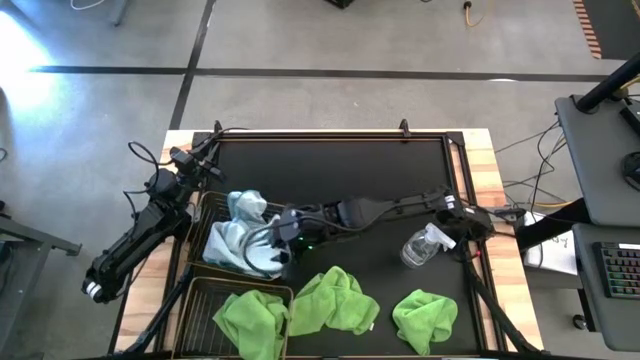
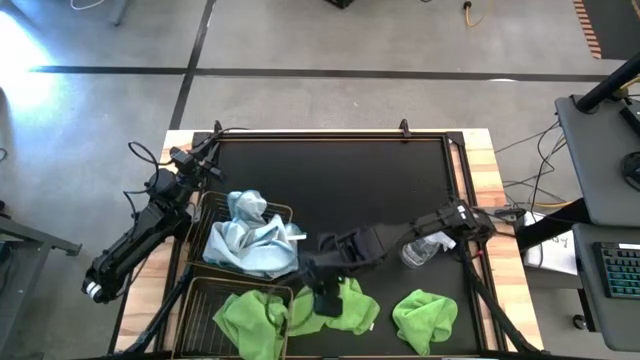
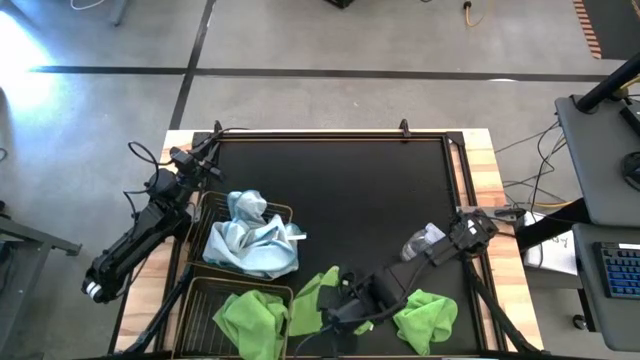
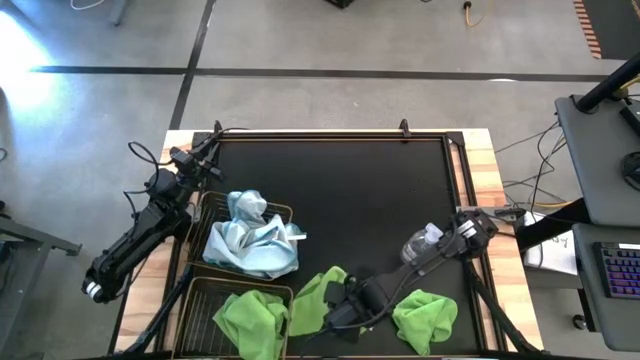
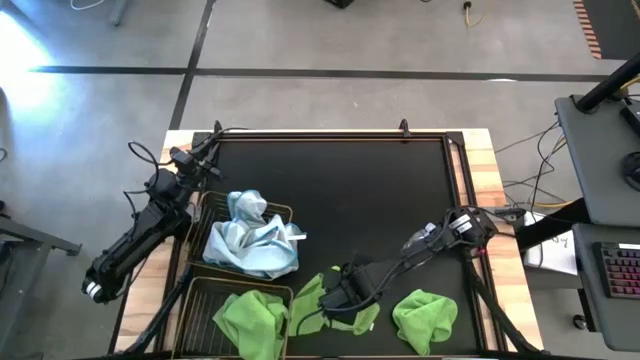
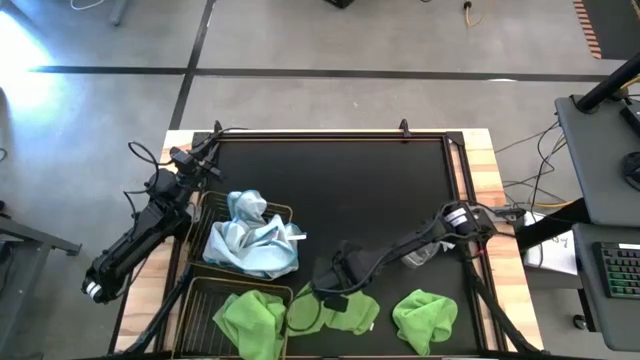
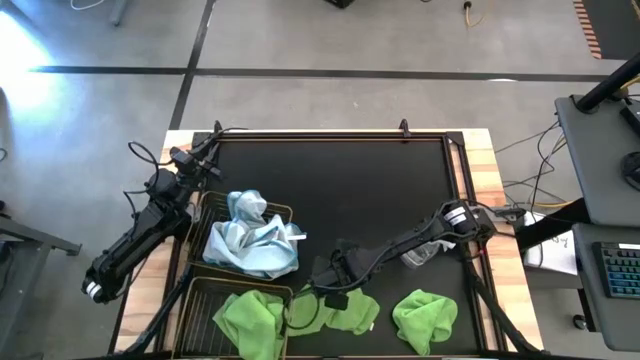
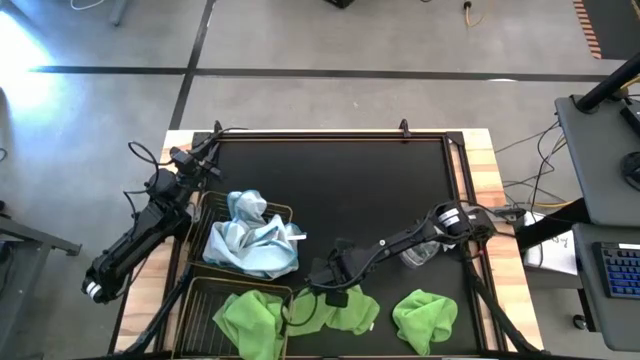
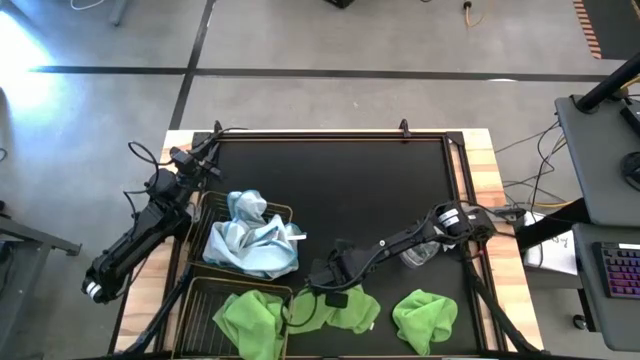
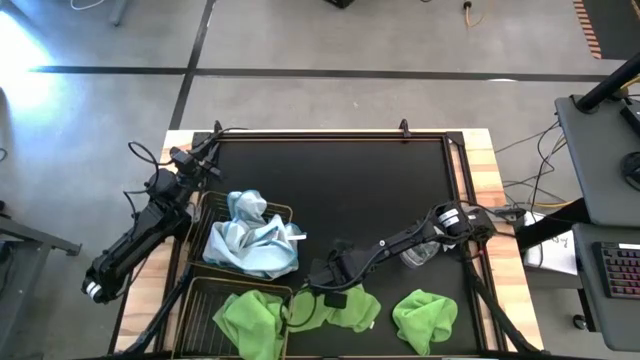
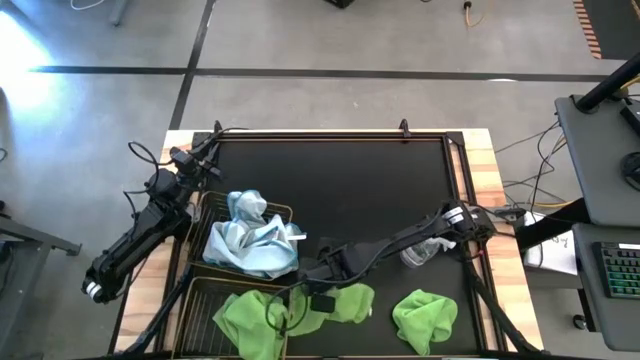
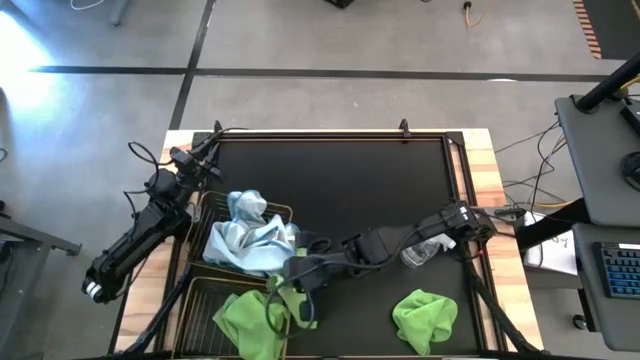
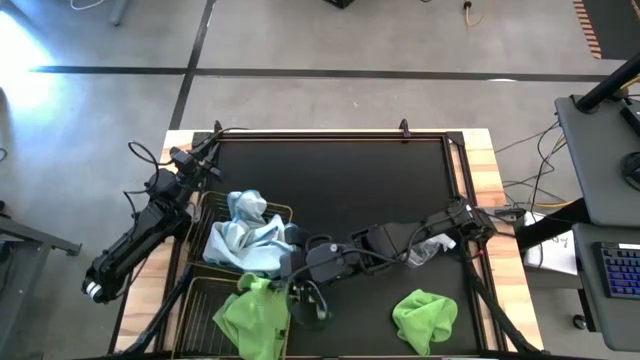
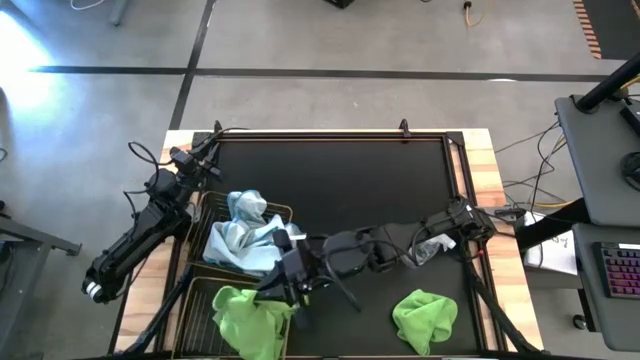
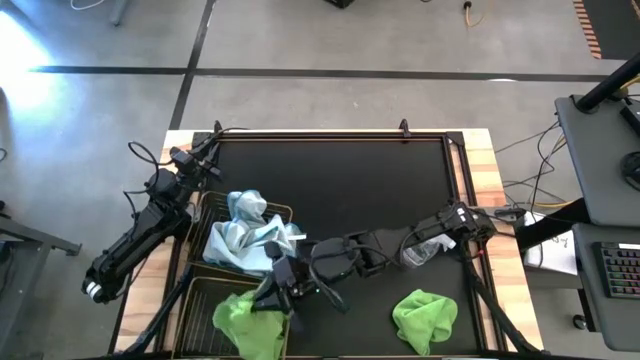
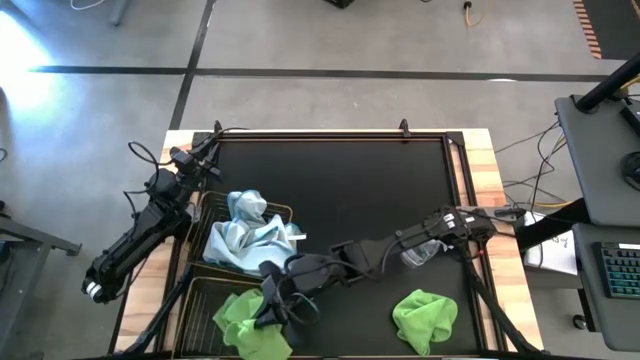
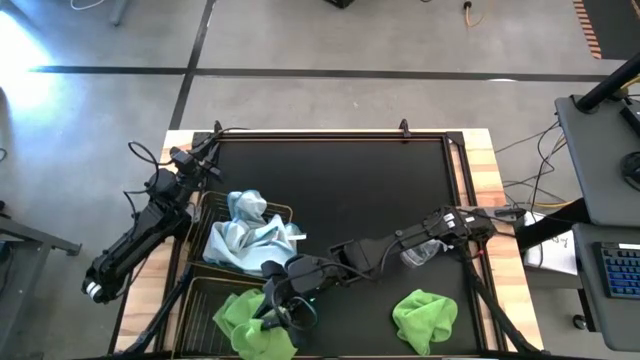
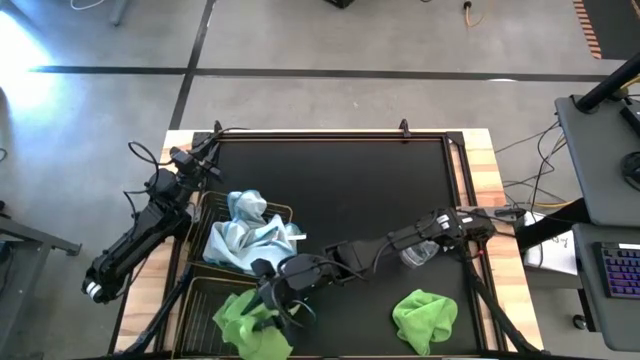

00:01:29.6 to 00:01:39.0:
Task: Sort microfiber towel by color & place in baskets
Put the left green towel into the bottom wire basket

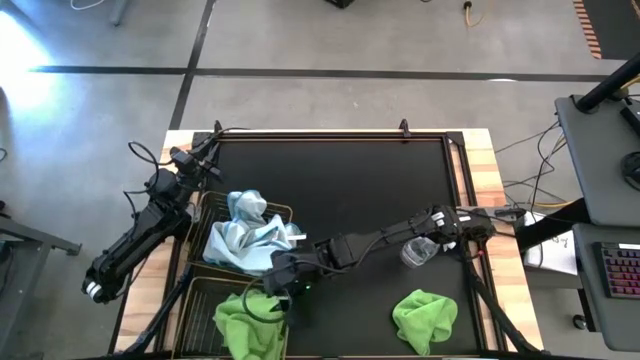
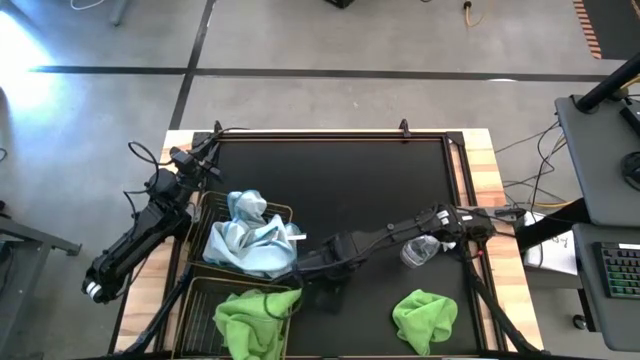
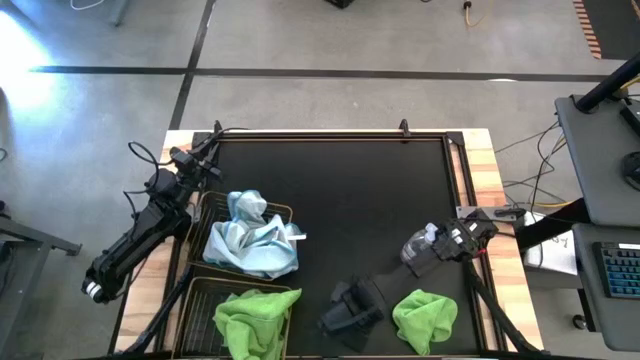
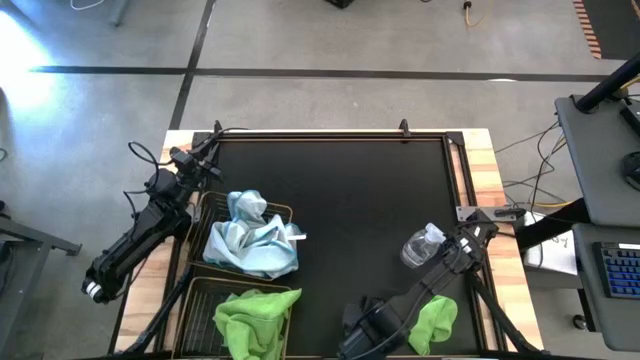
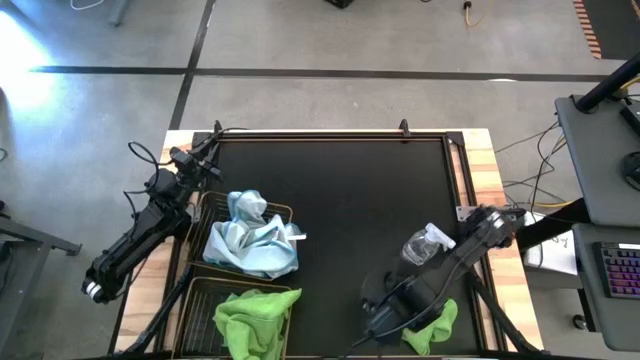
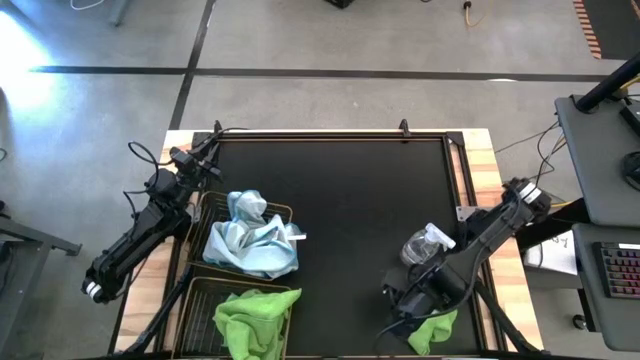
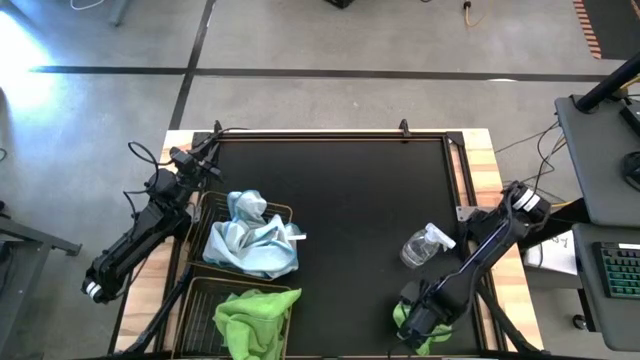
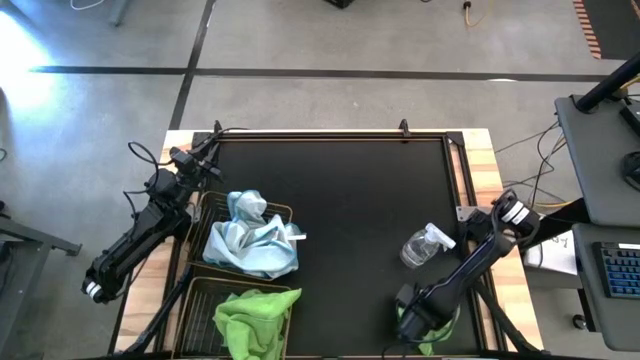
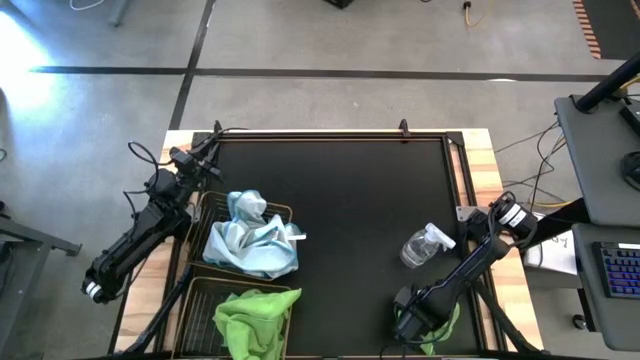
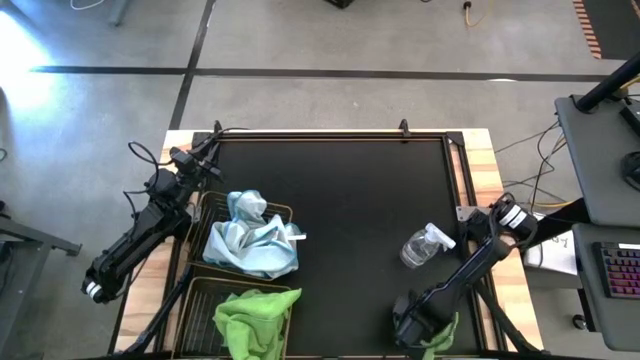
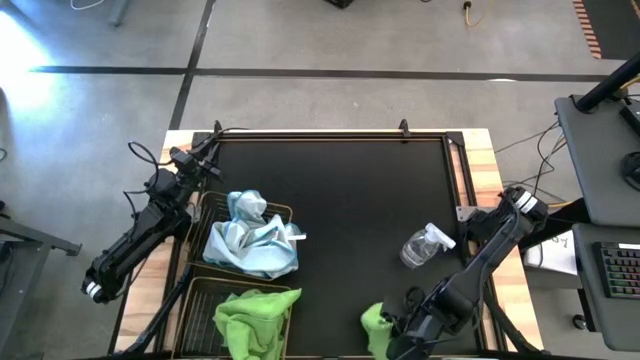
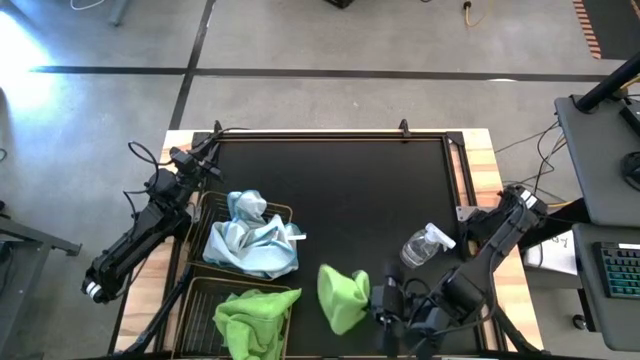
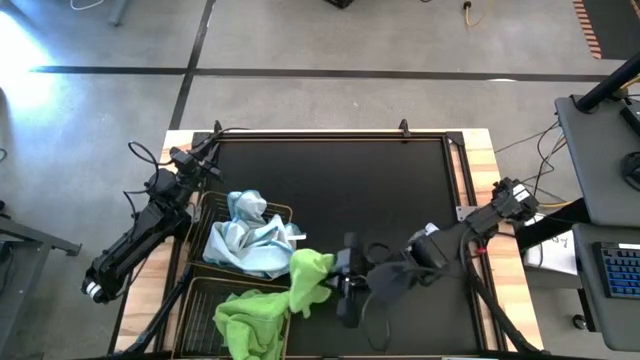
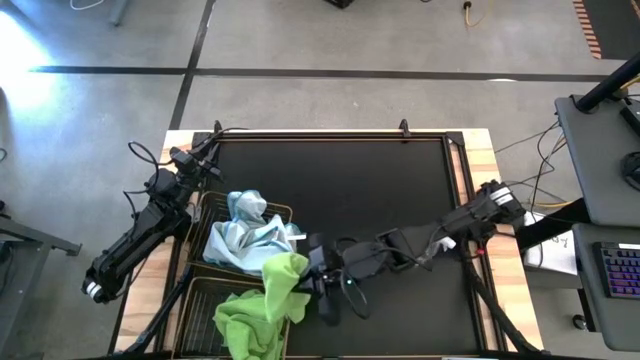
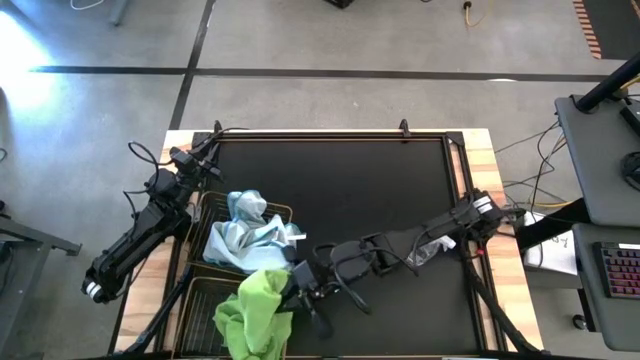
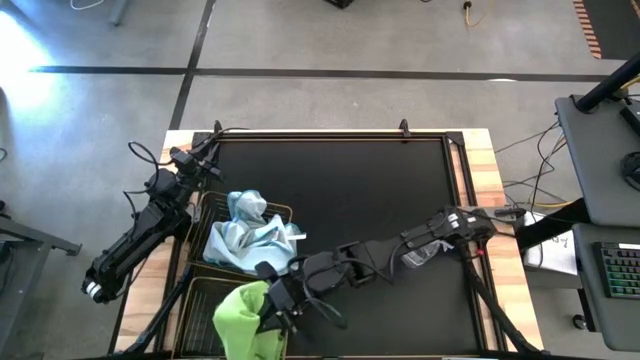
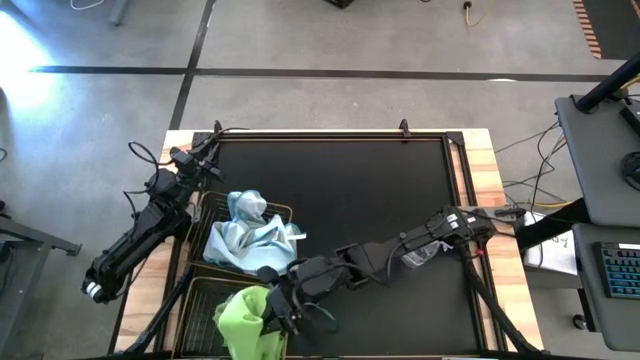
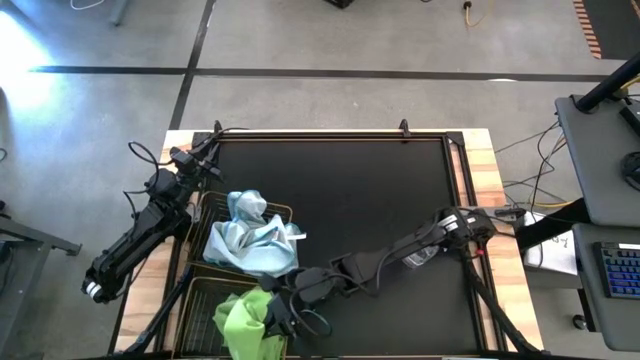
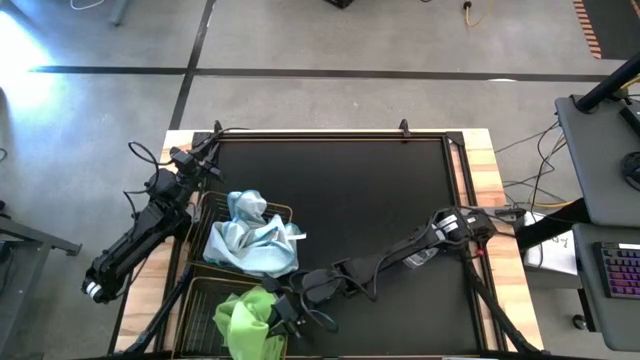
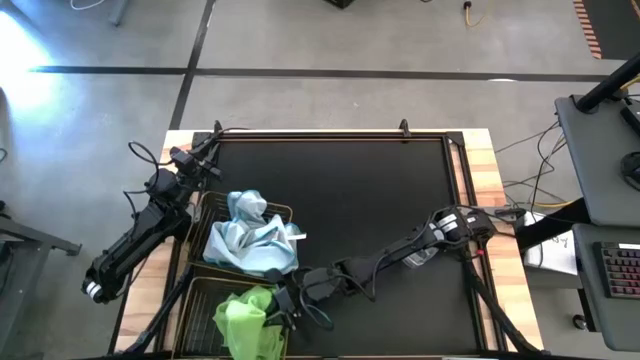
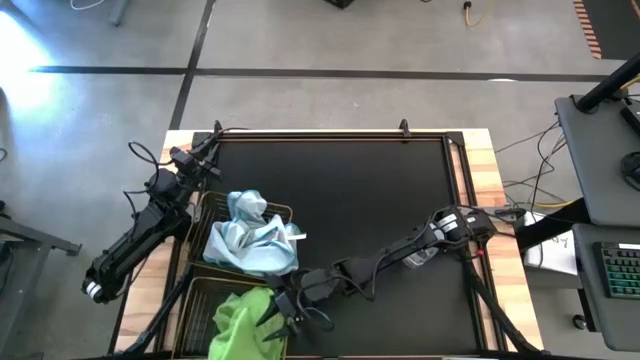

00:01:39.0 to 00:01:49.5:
Put the green towel into the bottom wire basket

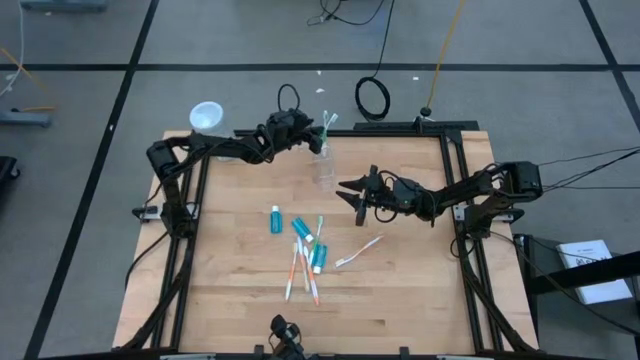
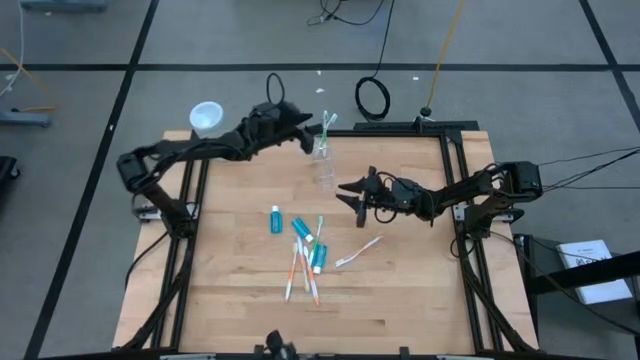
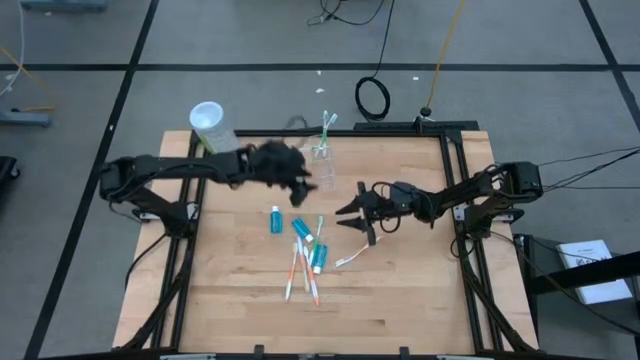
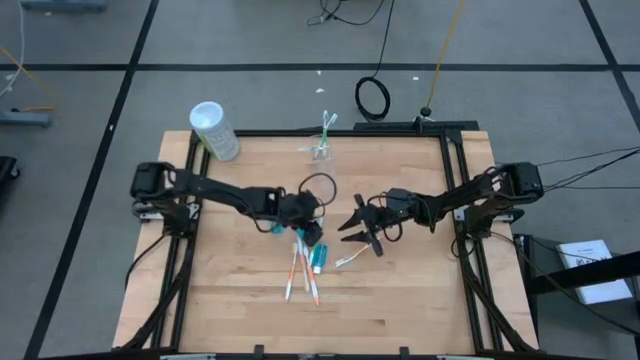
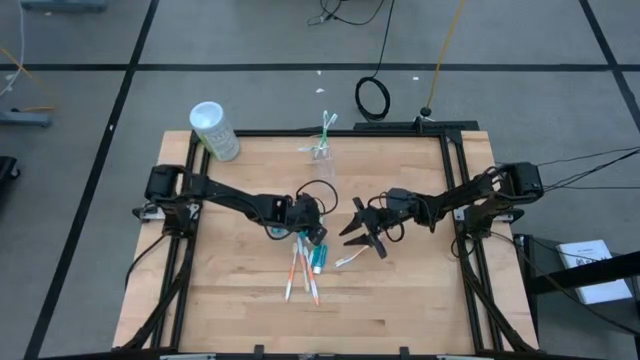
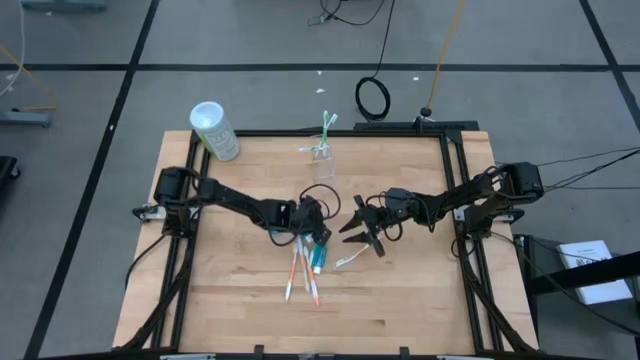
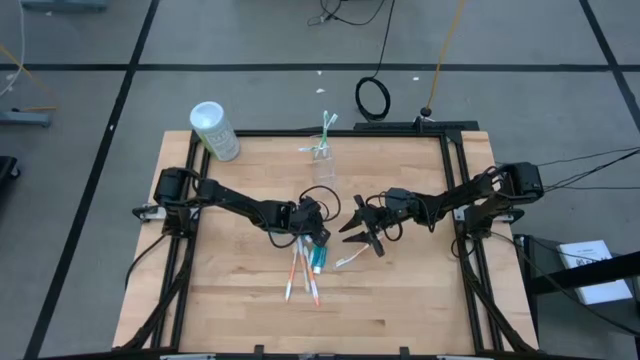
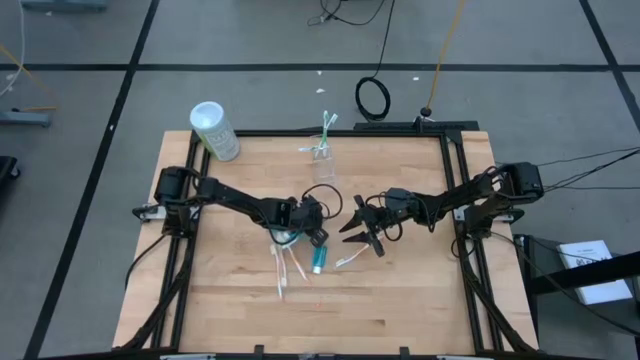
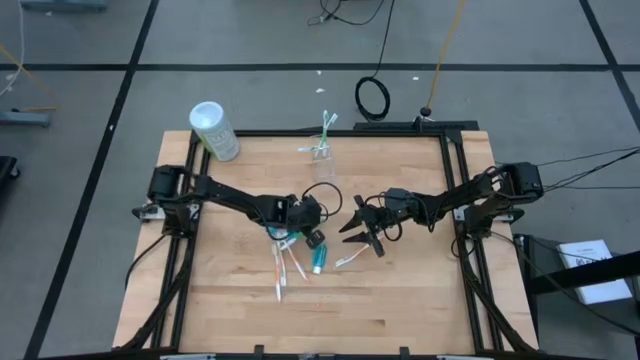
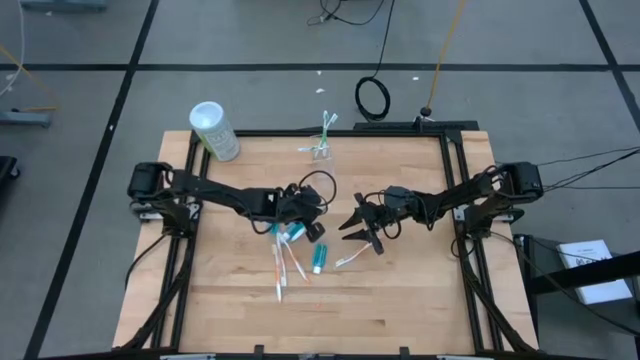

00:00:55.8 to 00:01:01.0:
Task: Pick & Place toothbrushing station
Put the green toothbrush into the transparent organizer
